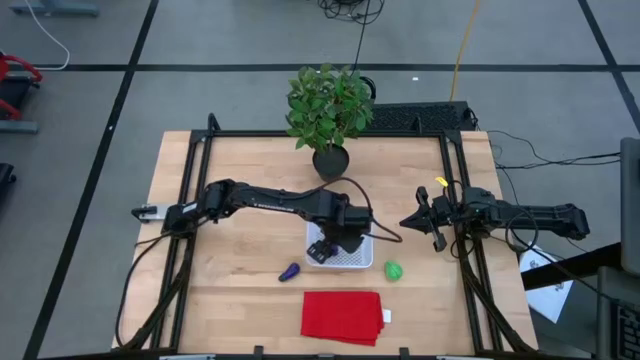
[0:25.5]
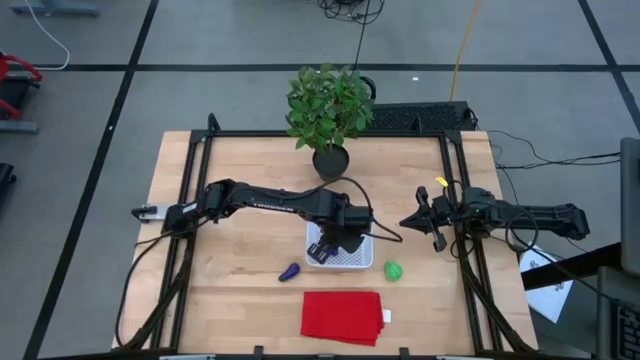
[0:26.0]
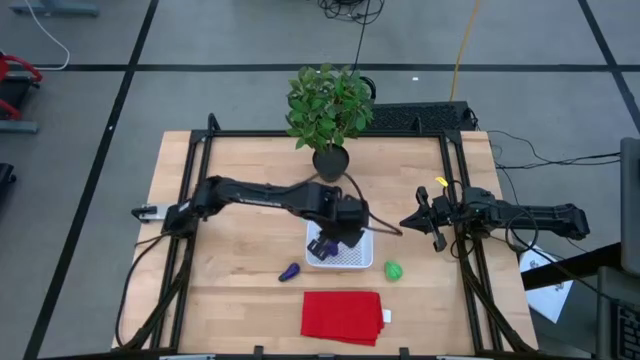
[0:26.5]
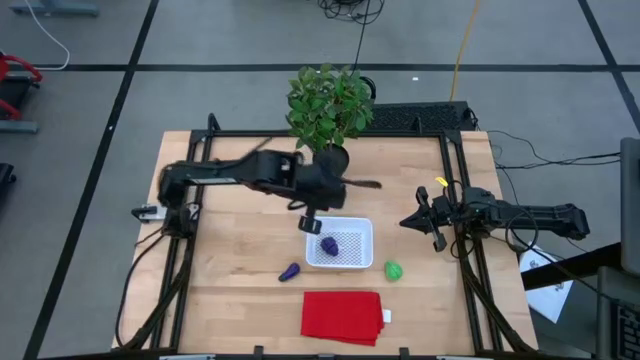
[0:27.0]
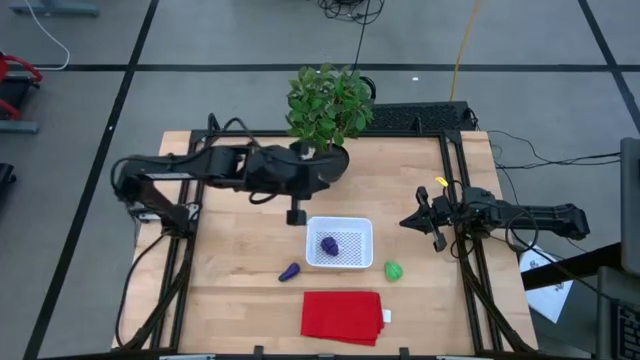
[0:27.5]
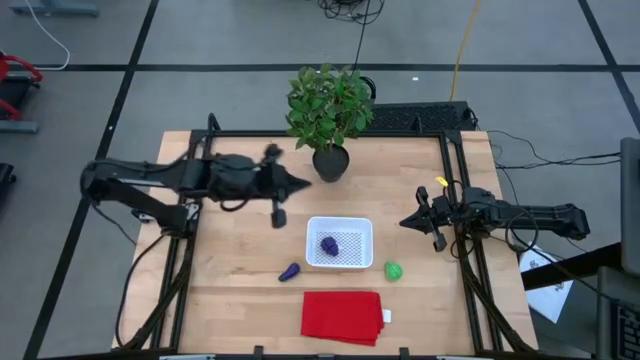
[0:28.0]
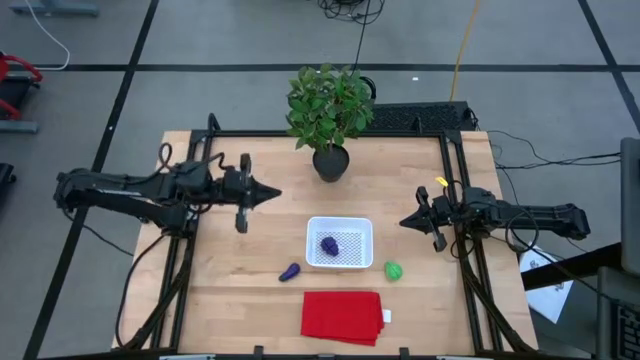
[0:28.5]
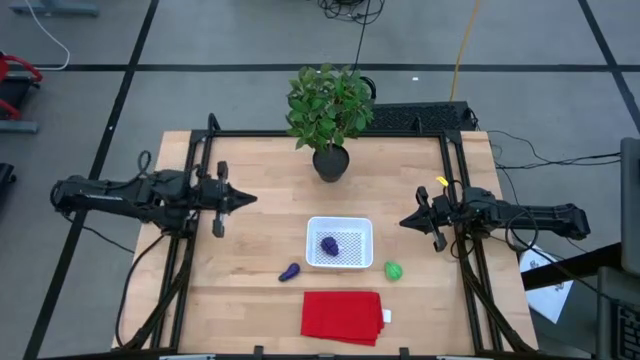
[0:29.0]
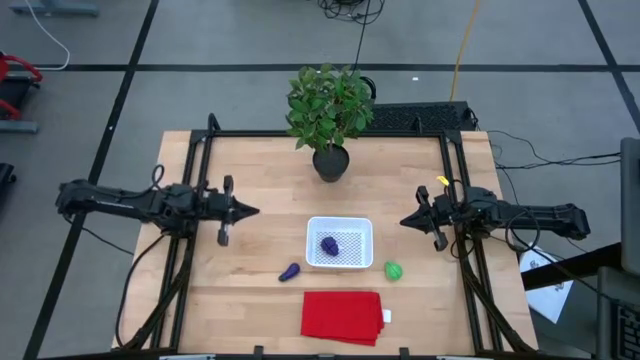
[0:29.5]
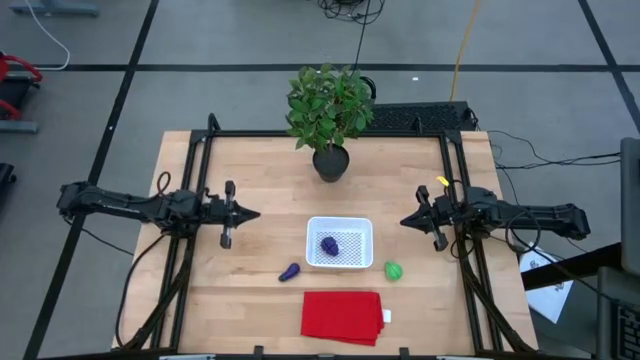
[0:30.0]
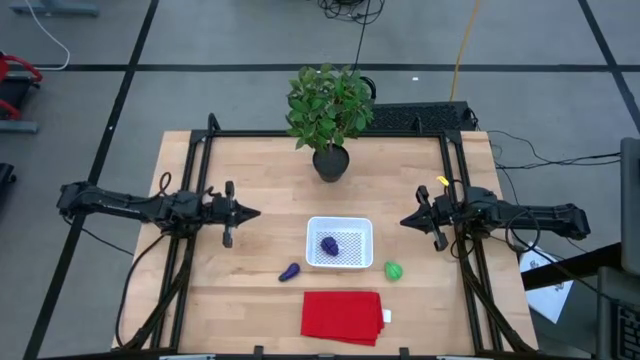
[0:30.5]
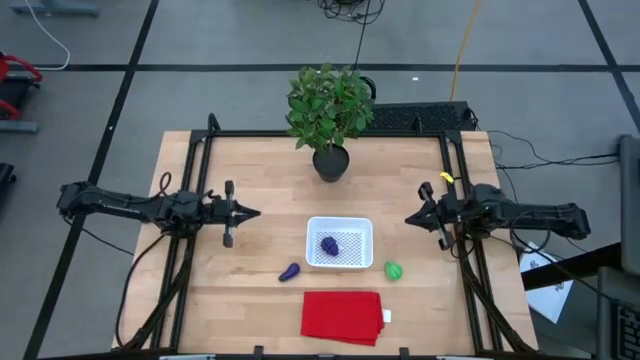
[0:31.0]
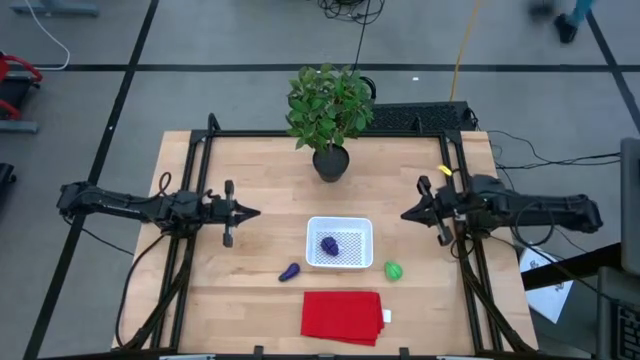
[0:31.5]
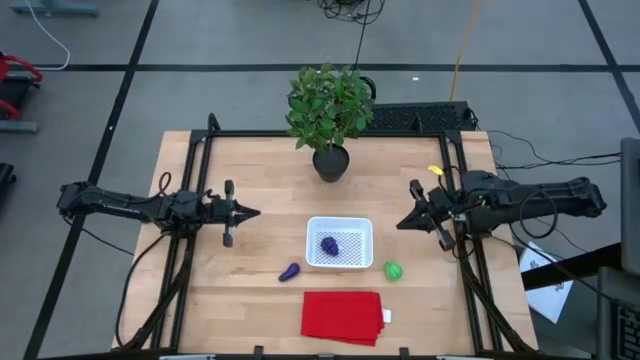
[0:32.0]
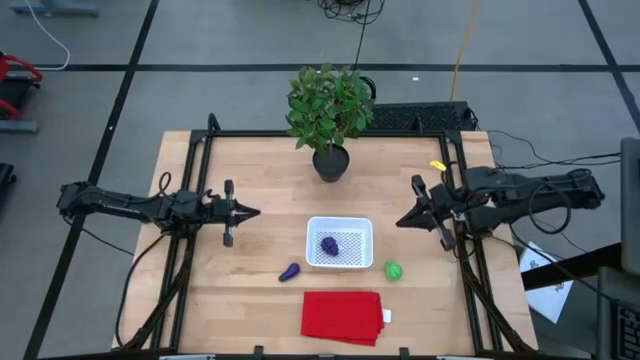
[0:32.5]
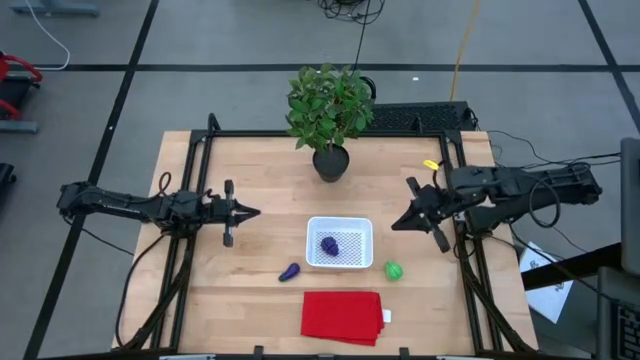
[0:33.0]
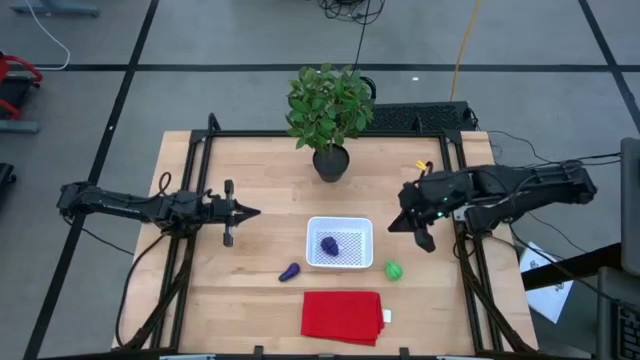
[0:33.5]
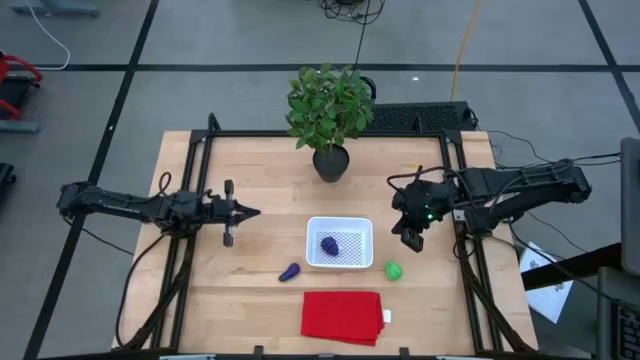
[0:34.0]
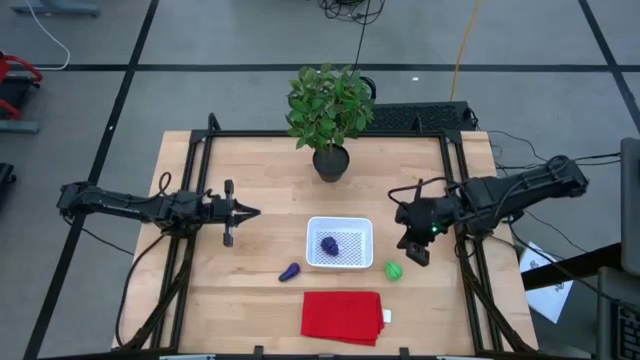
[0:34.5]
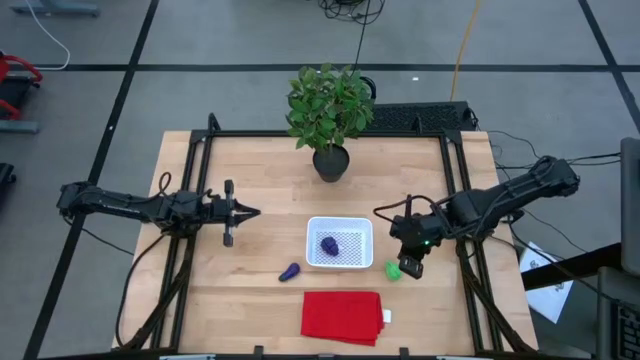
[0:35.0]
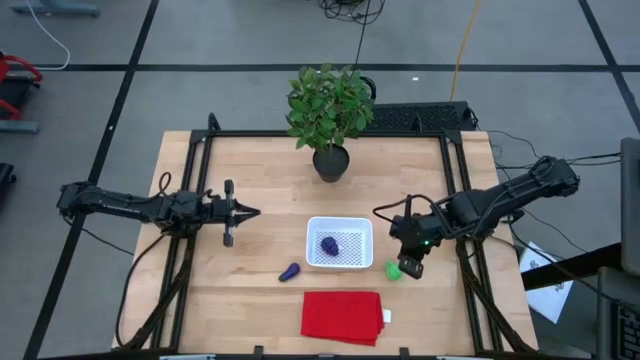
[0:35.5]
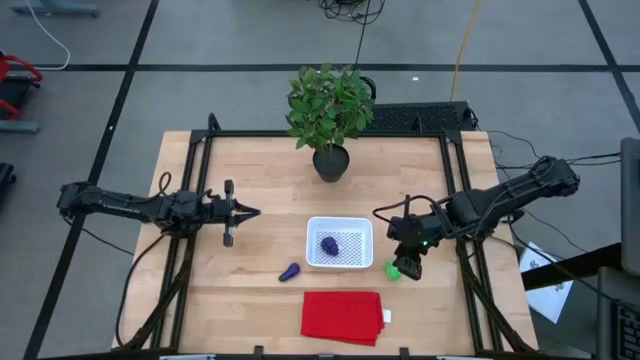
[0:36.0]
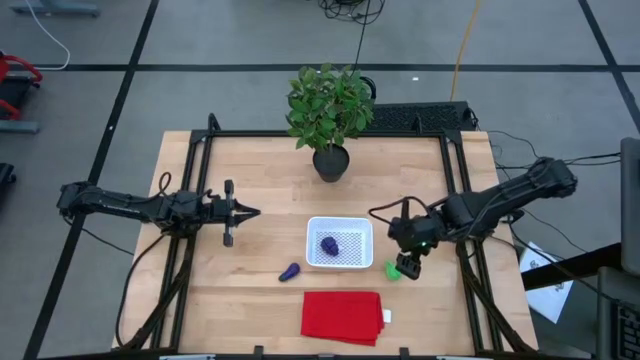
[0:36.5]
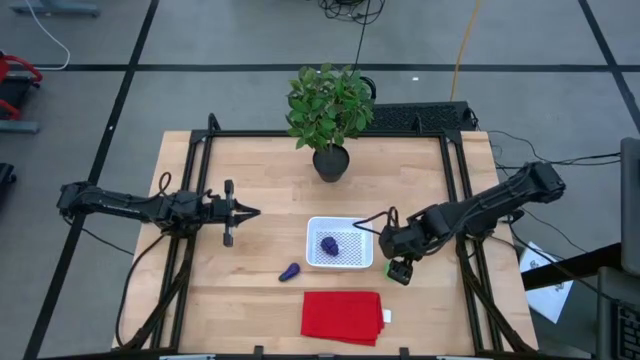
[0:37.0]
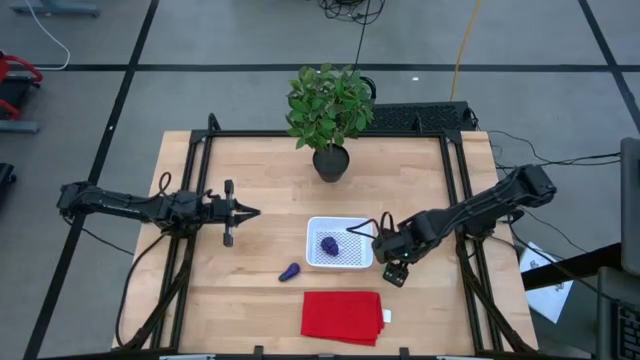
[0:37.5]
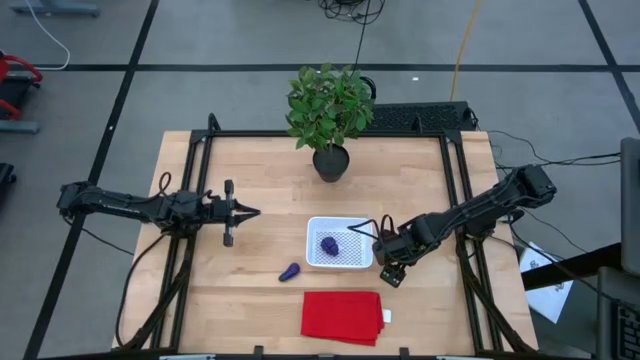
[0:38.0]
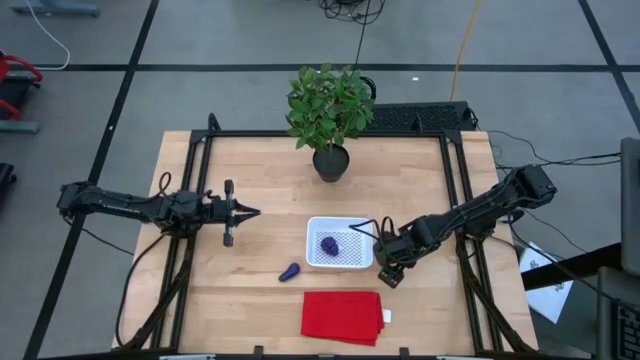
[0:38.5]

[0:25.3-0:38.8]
Task: Pick and placing Produce into tupperware
Put the green pear into the white bin

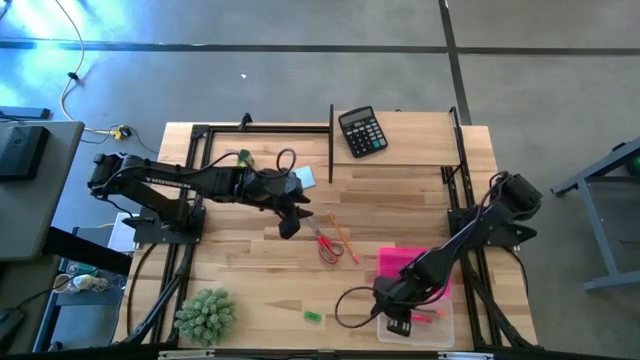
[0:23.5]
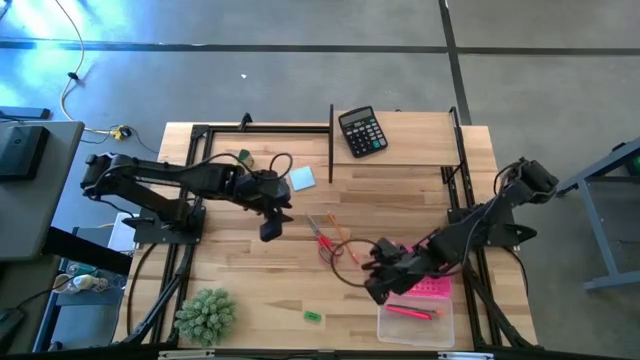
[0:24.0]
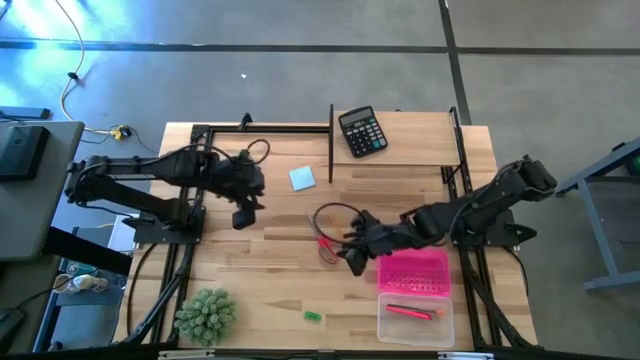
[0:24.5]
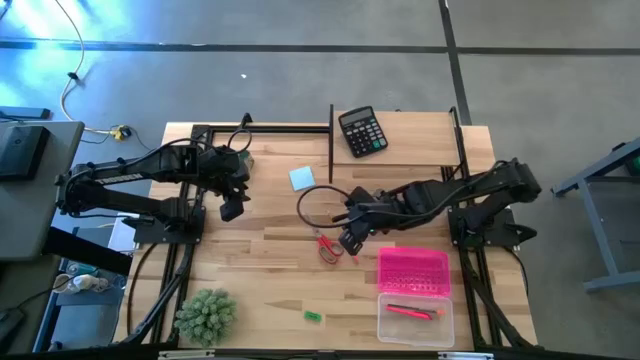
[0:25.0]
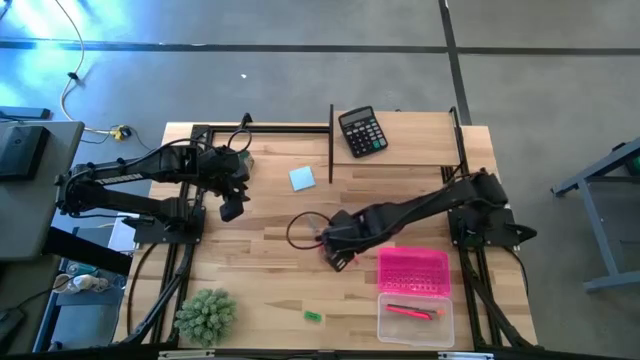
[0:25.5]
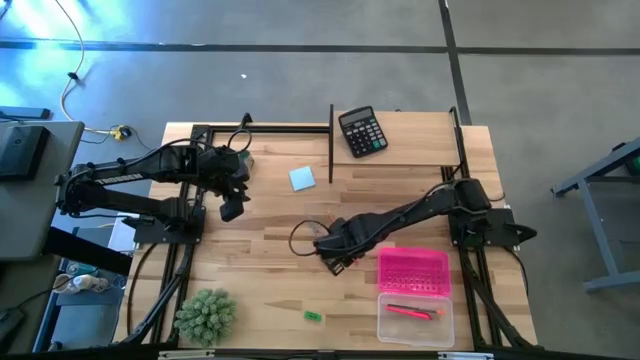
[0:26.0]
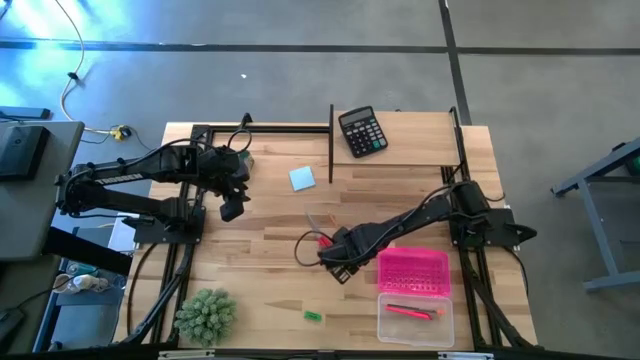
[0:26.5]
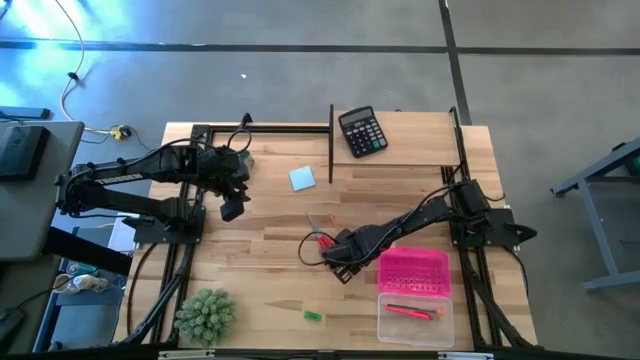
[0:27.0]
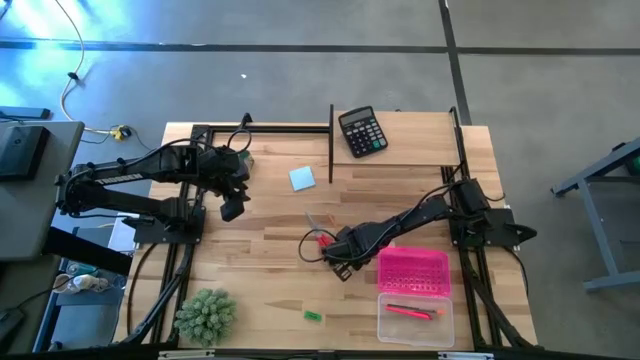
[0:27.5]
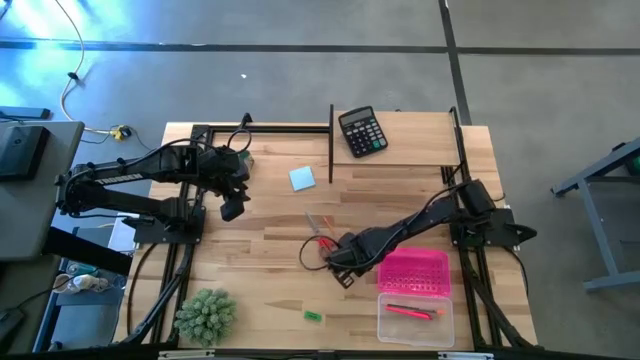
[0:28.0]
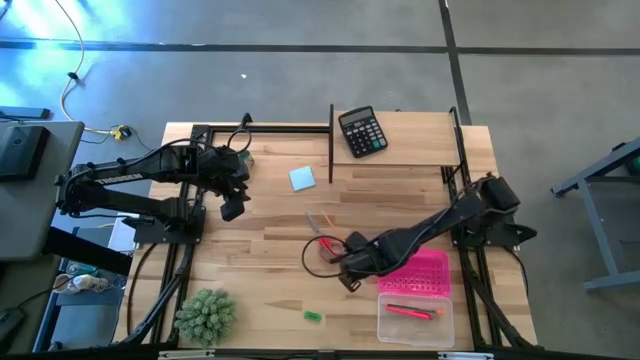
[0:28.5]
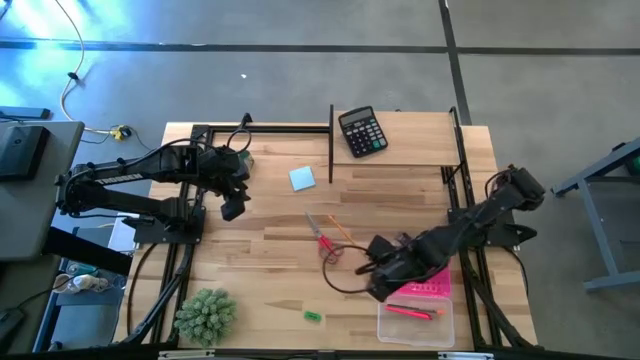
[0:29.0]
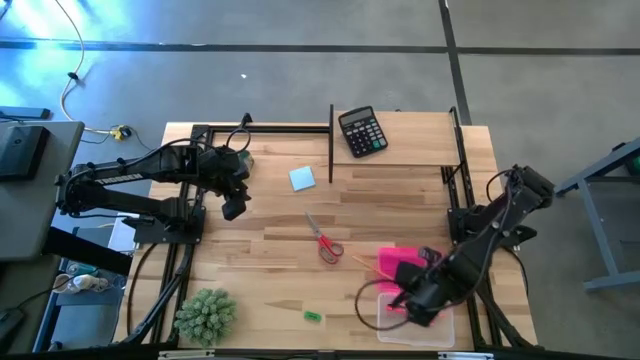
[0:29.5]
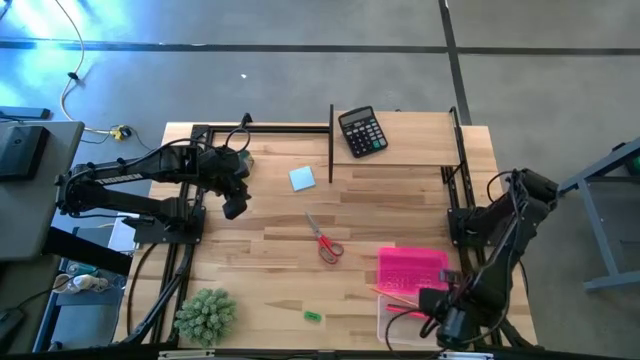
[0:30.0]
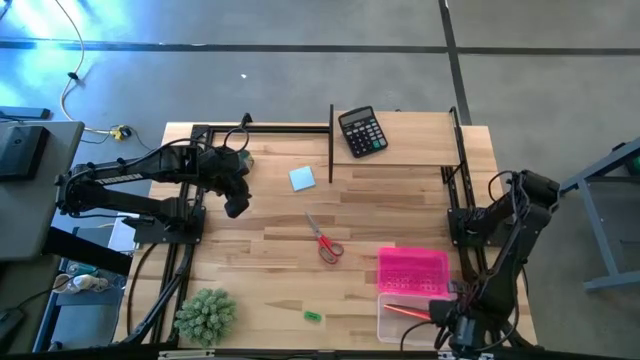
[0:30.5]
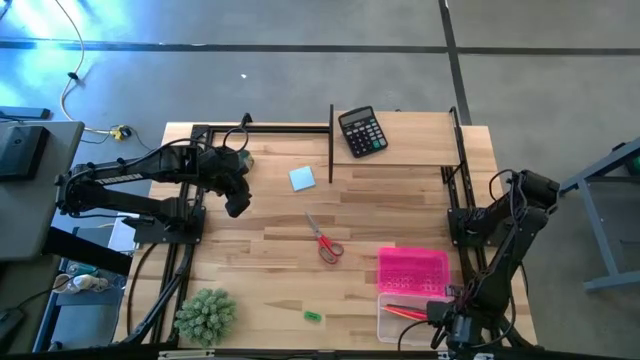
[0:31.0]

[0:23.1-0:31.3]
Task: Pack school essentials
Put the yellow pencil into the supply box
